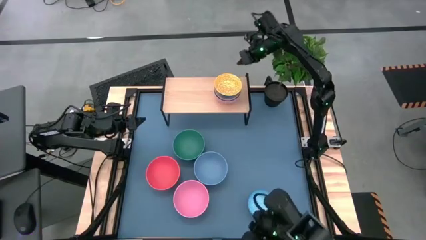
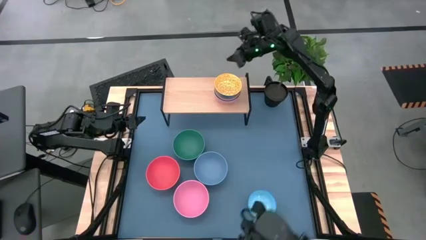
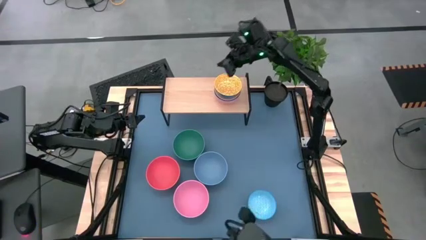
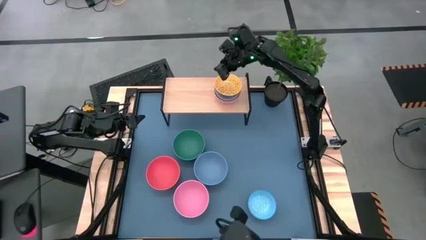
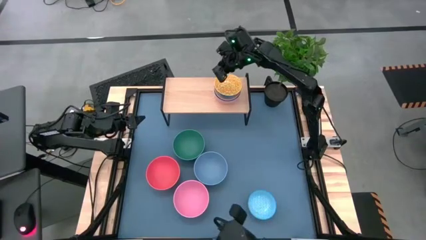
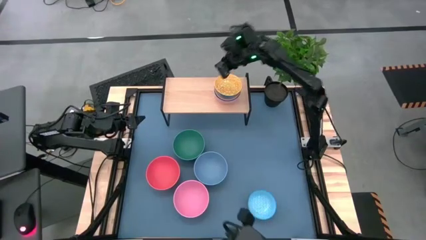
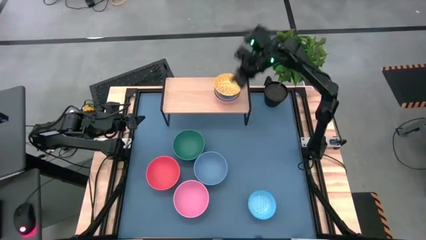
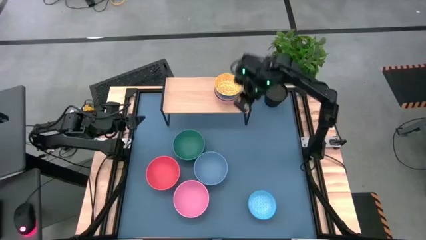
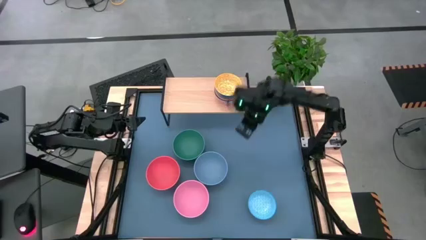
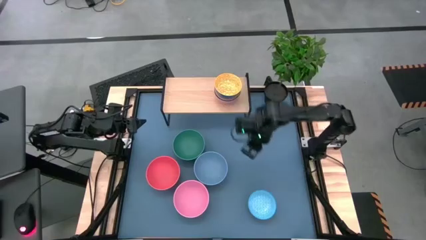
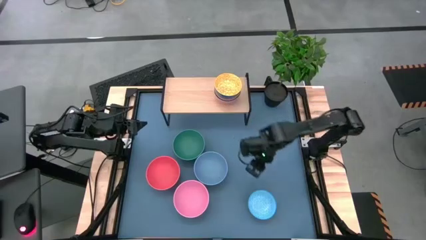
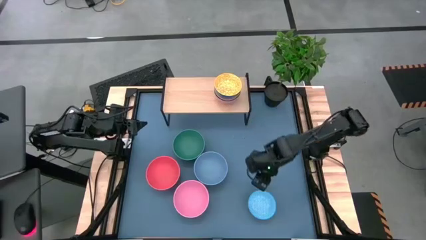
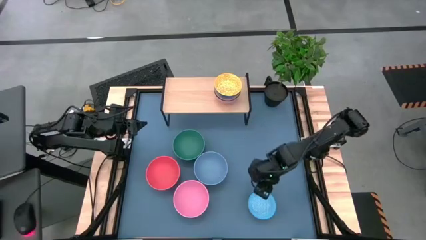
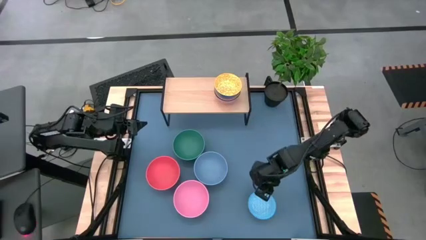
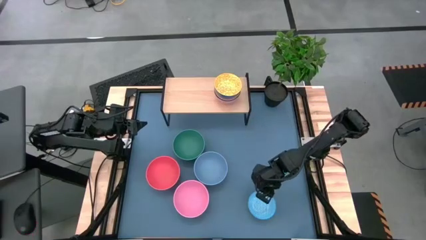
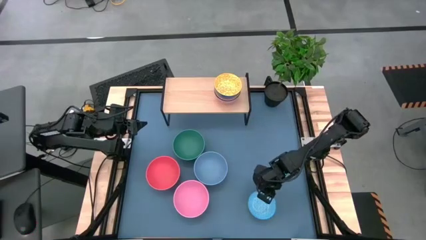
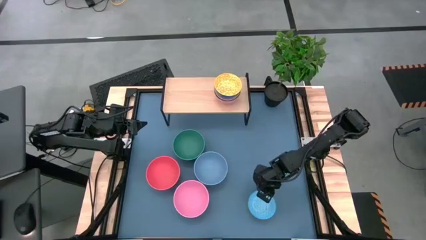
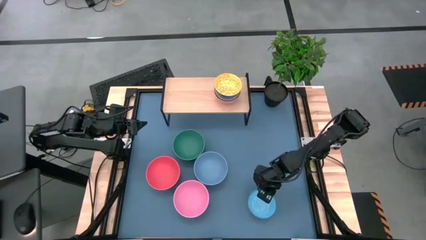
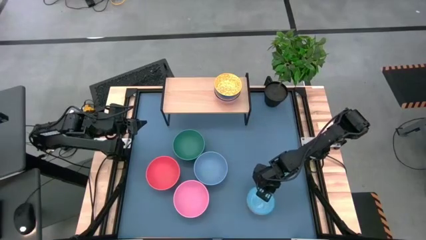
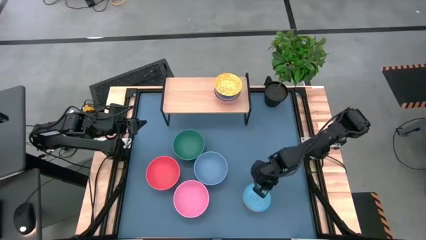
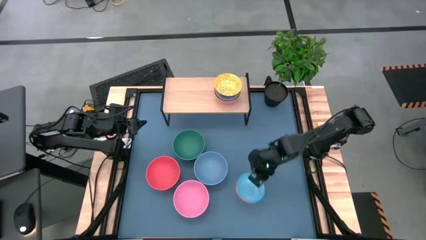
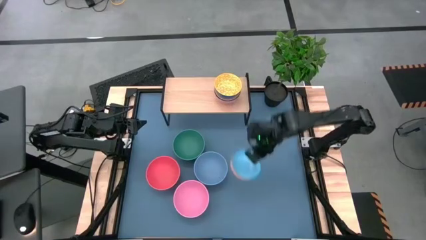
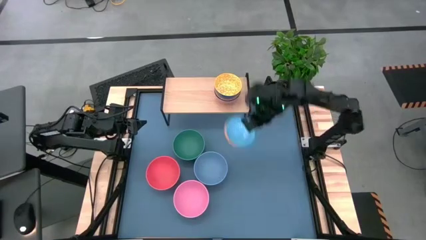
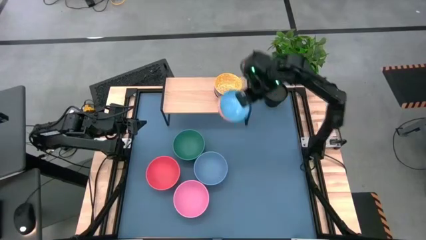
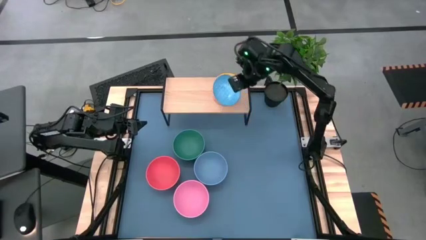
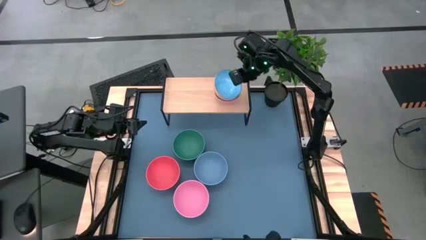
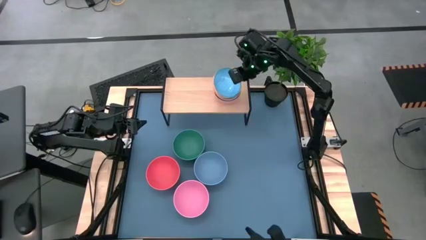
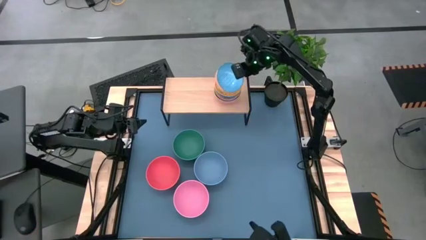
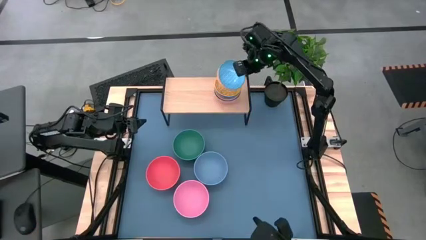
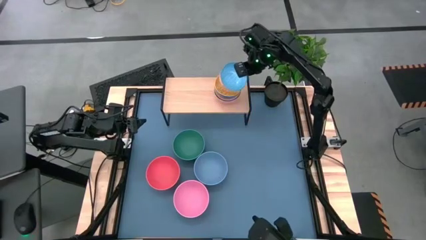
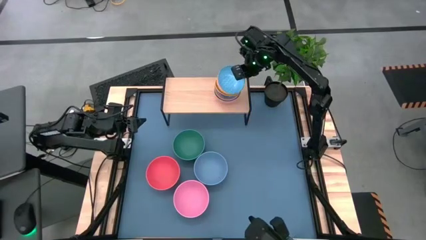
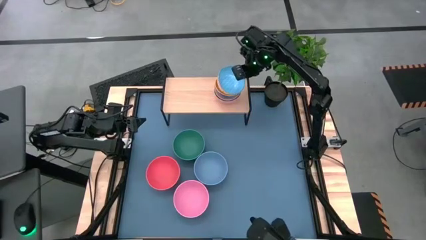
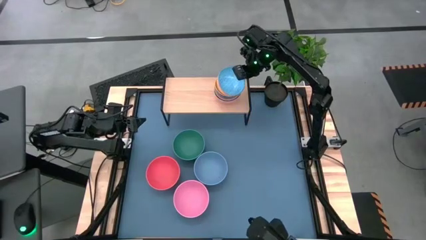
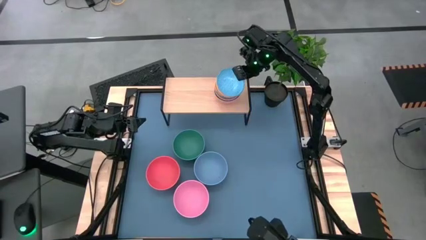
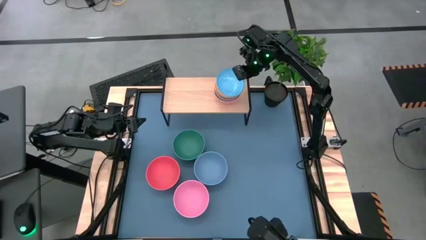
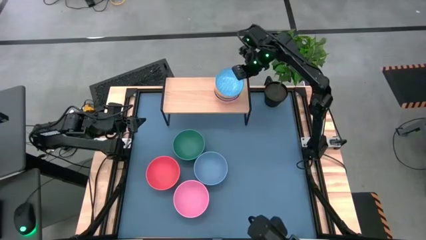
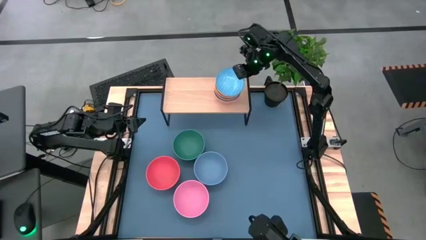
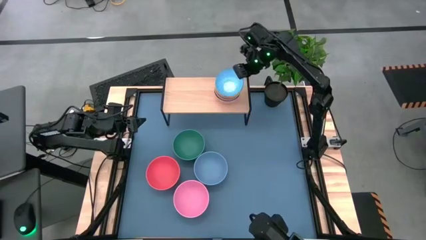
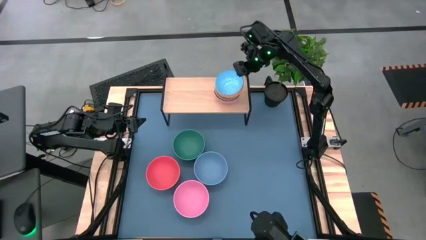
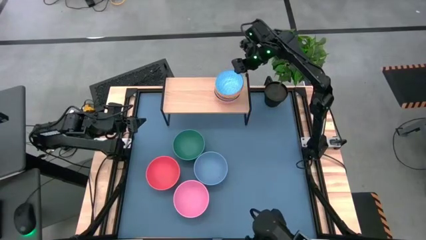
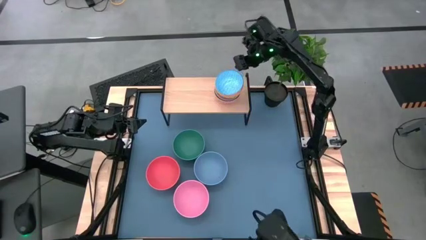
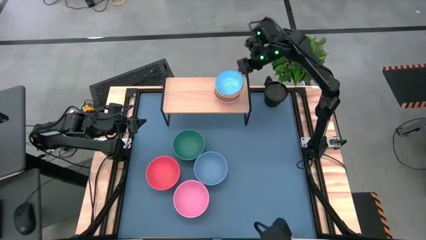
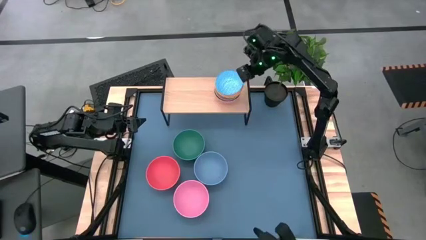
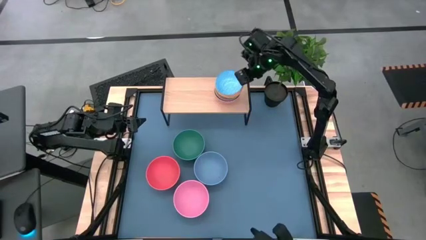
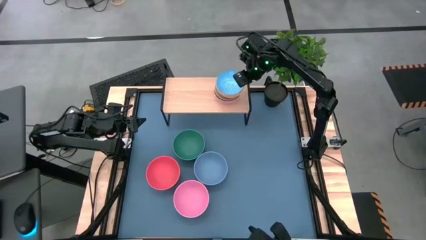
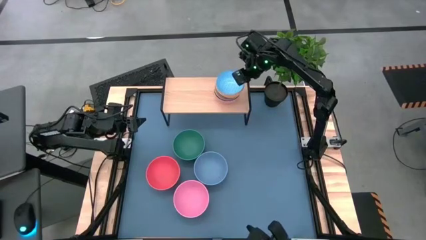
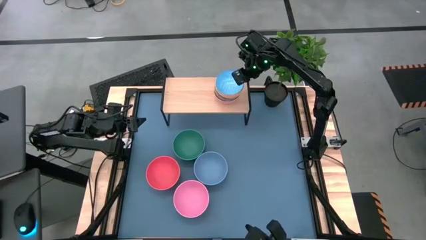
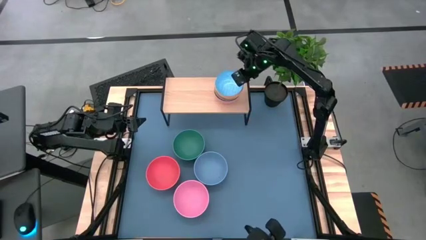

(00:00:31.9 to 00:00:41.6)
Task: Place and stack bowls onto a shelf
Stack the light blue-patterned bowl on top of the yellow-patterned bowl on the shelf

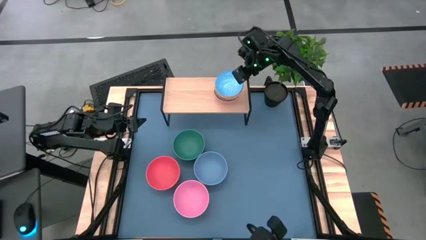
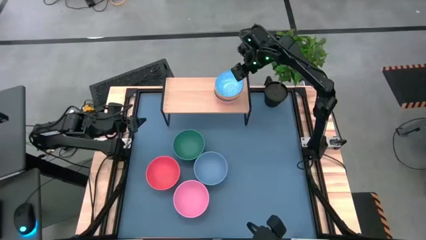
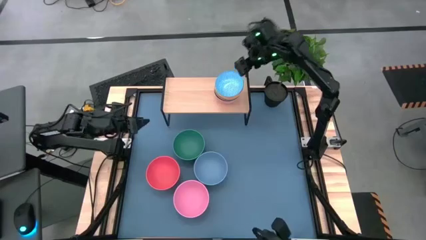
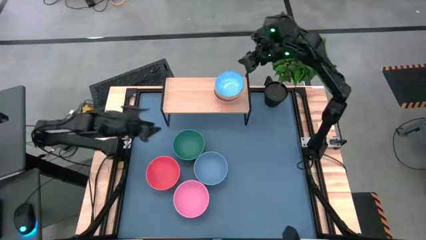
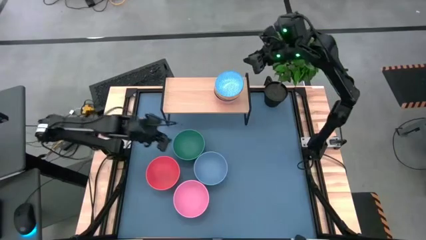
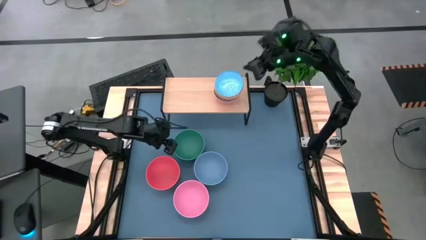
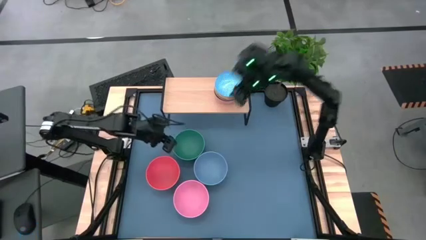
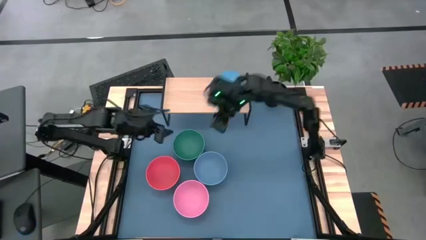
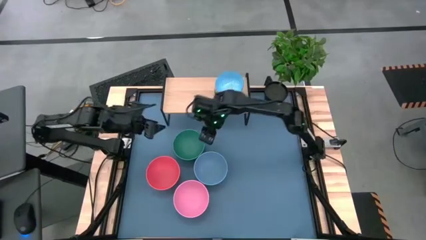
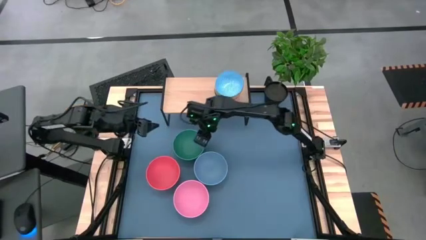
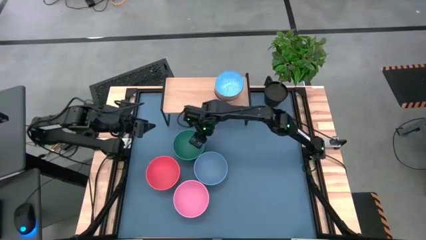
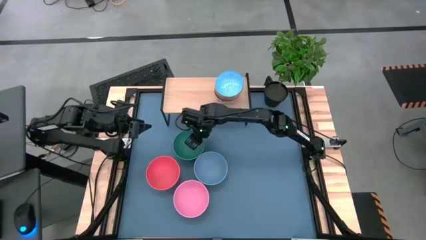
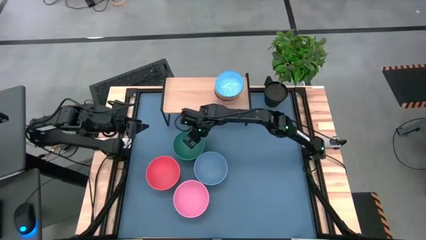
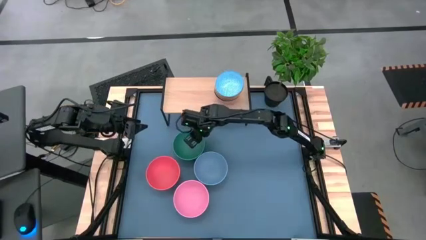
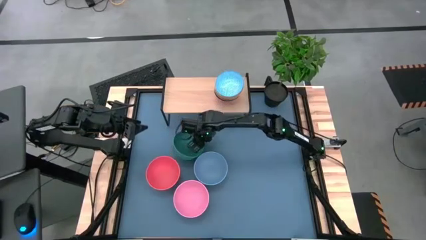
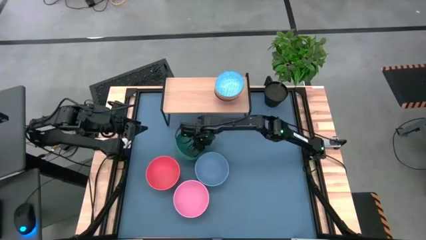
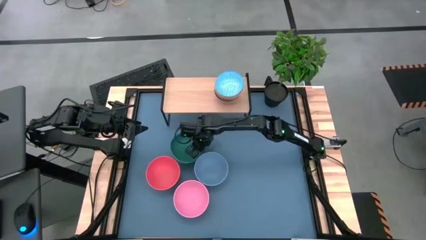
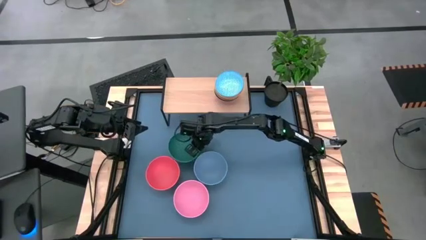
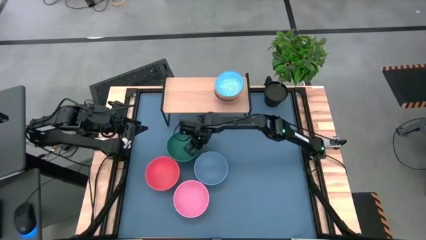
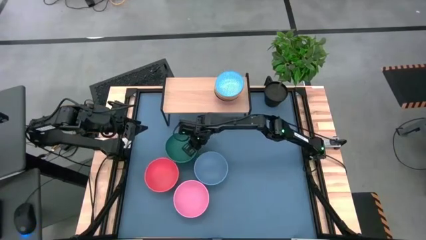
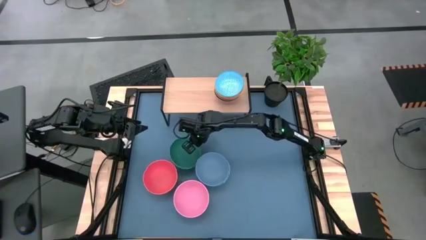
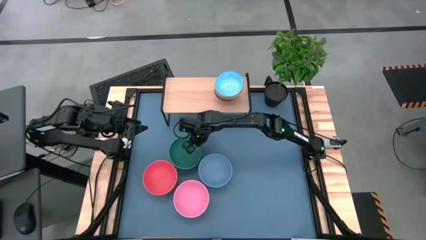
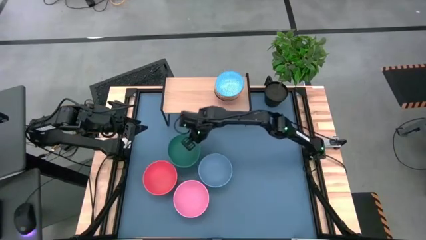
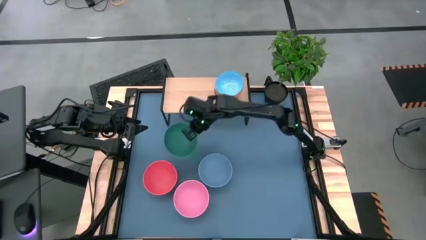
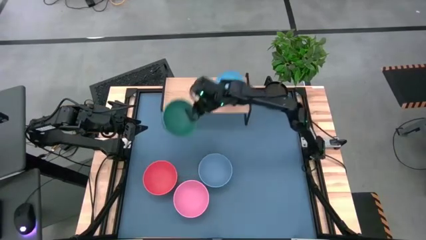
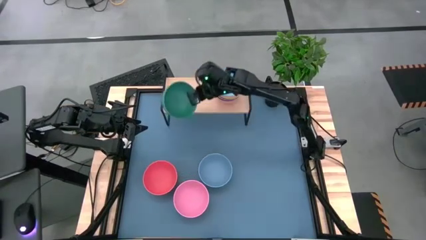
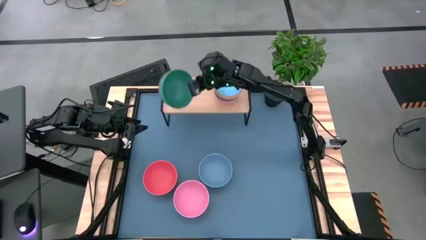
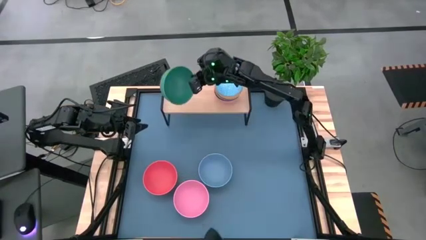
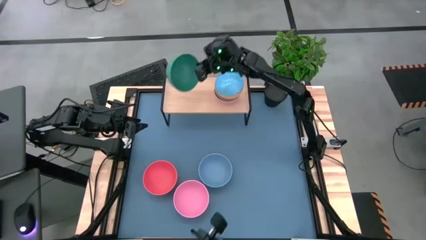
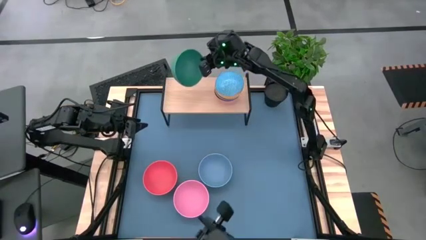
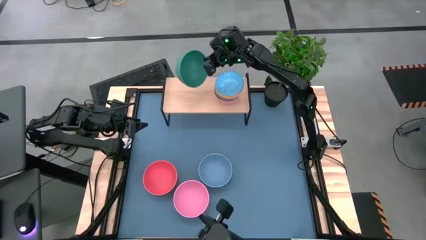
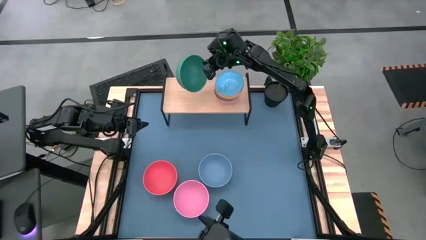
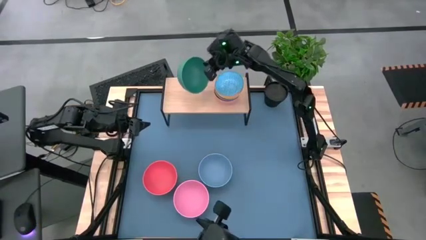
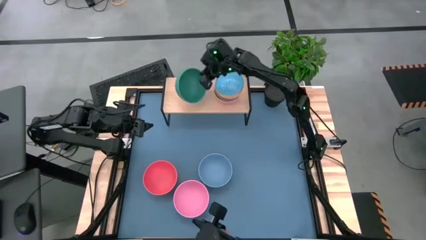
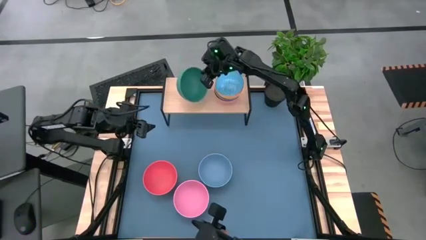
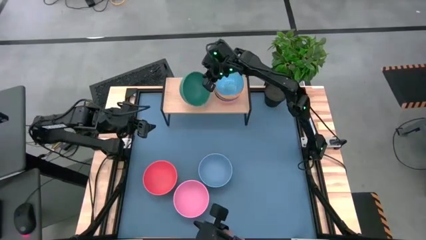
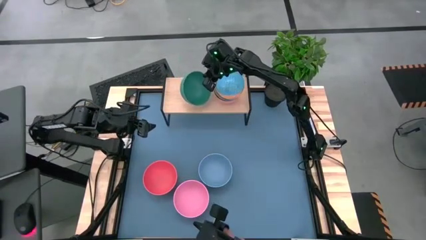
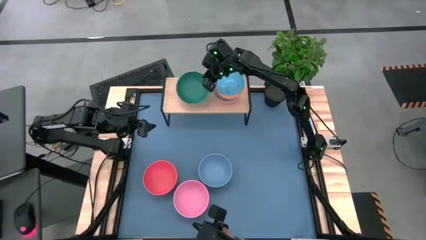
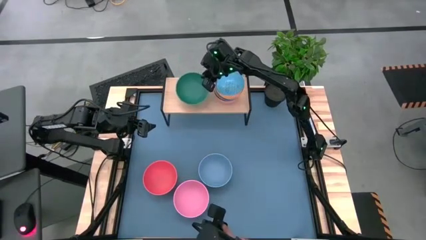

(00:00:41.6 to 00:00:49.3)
Put the green bowl on the shelf
